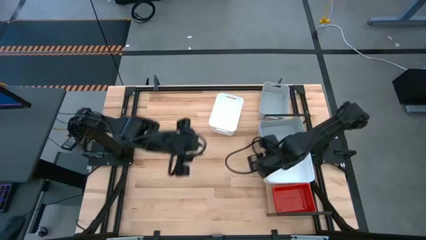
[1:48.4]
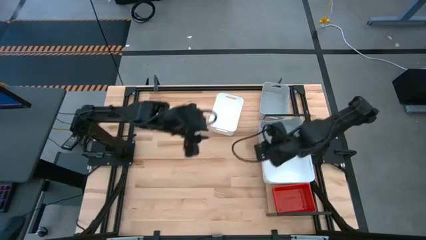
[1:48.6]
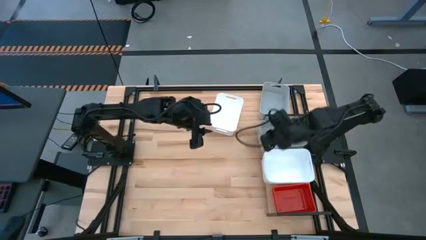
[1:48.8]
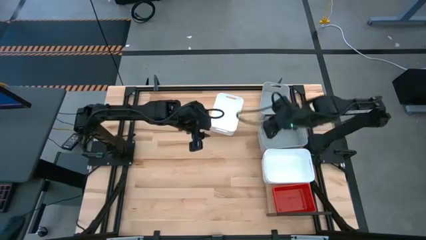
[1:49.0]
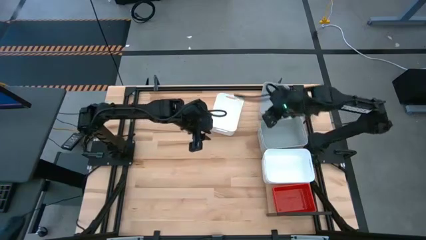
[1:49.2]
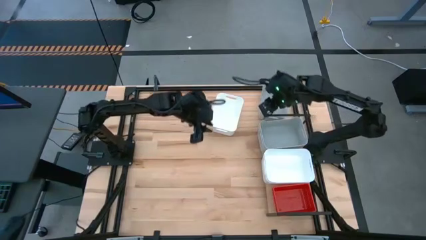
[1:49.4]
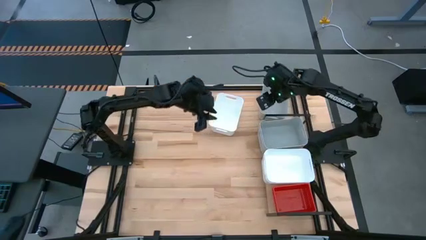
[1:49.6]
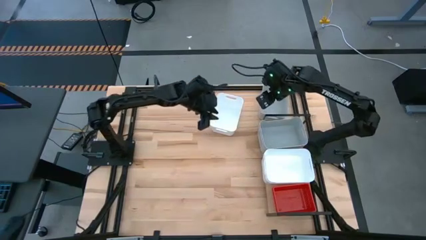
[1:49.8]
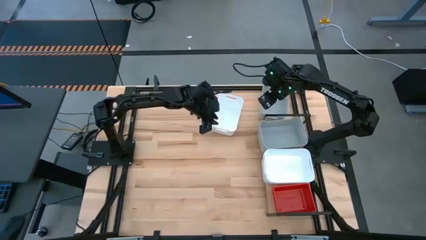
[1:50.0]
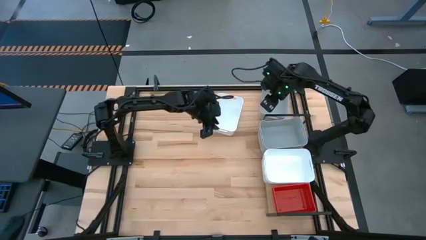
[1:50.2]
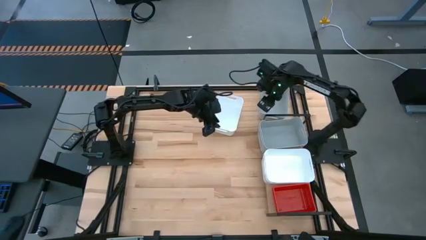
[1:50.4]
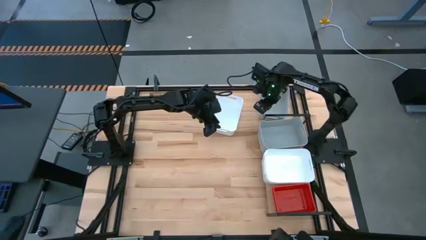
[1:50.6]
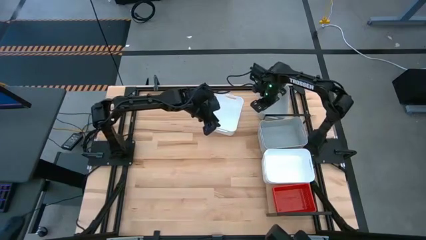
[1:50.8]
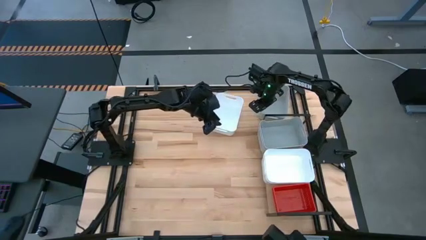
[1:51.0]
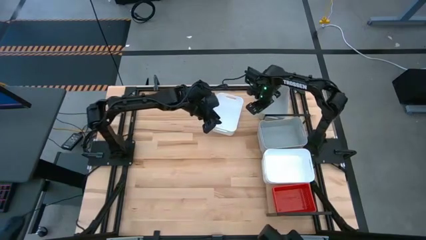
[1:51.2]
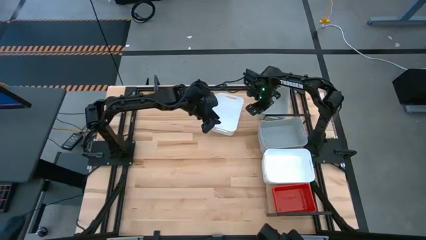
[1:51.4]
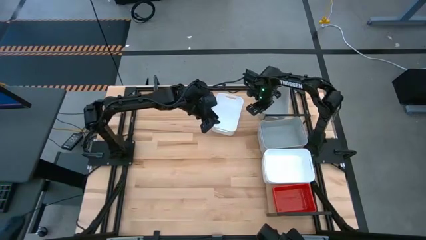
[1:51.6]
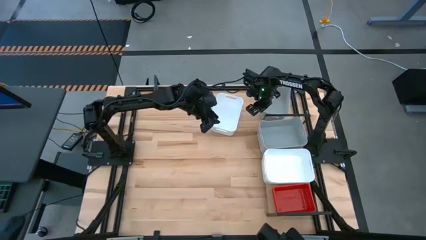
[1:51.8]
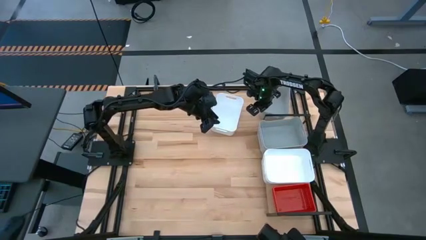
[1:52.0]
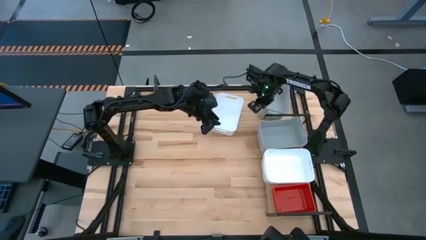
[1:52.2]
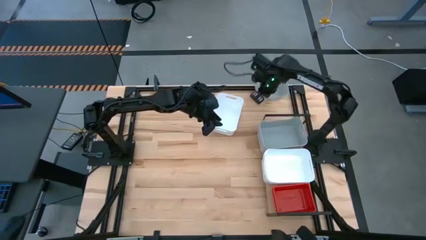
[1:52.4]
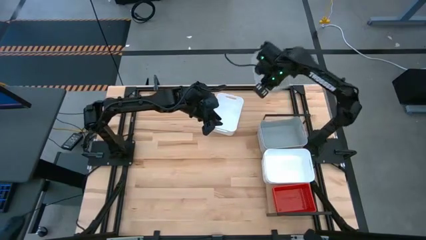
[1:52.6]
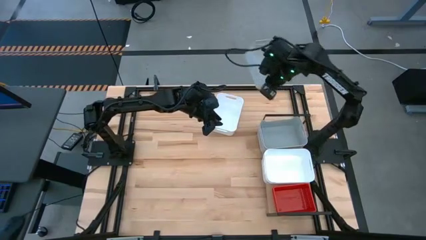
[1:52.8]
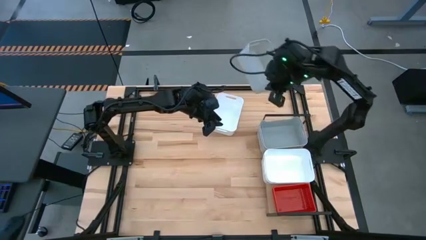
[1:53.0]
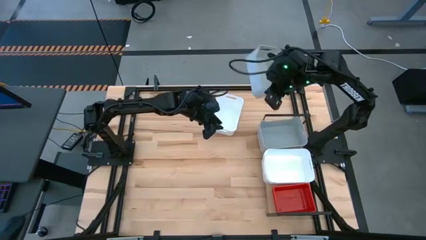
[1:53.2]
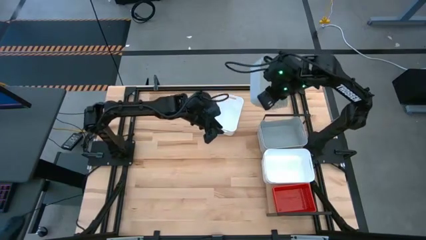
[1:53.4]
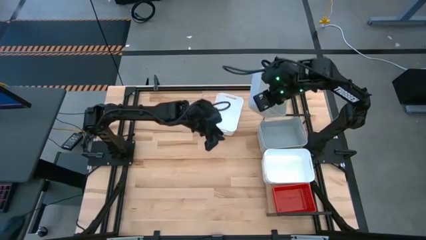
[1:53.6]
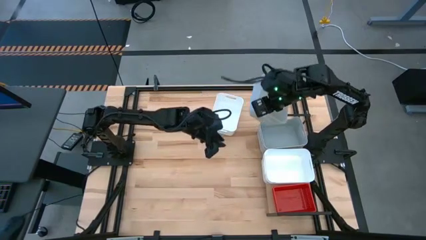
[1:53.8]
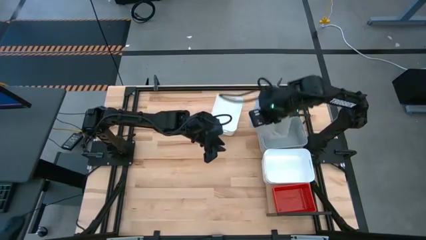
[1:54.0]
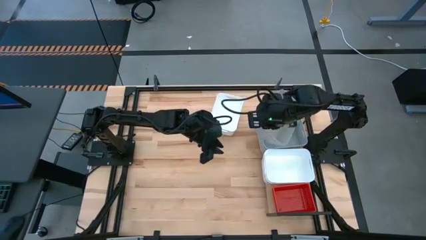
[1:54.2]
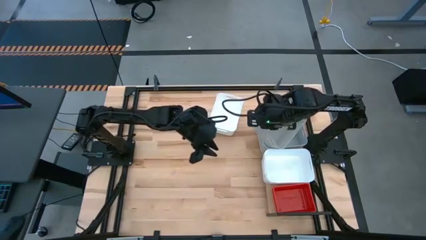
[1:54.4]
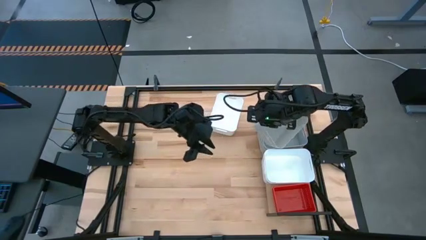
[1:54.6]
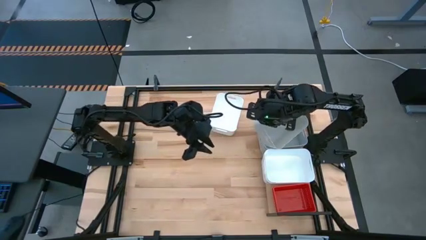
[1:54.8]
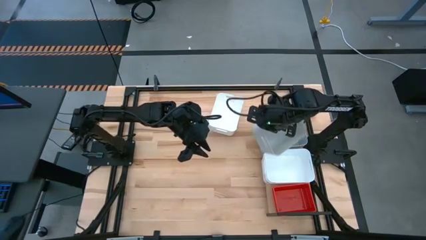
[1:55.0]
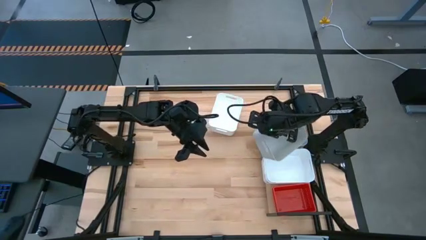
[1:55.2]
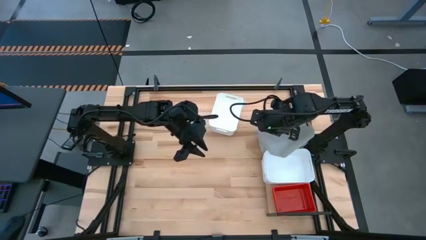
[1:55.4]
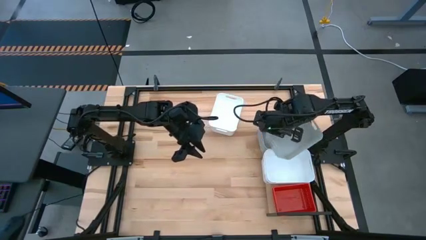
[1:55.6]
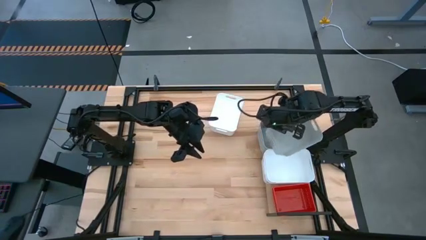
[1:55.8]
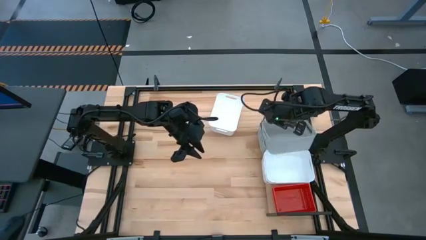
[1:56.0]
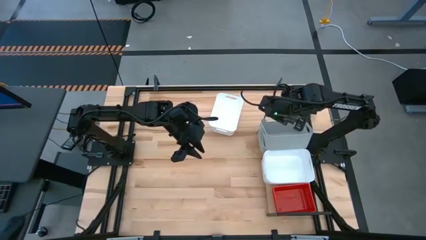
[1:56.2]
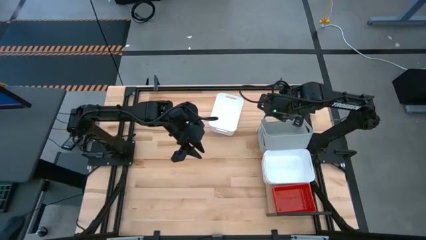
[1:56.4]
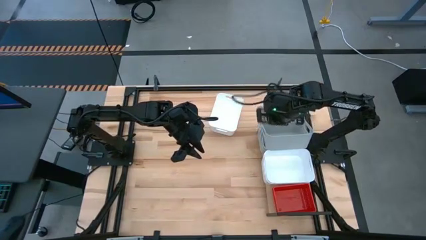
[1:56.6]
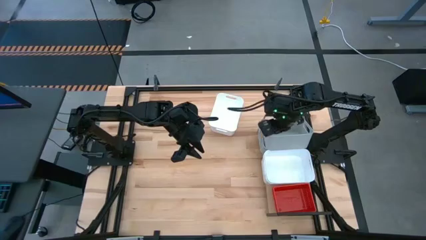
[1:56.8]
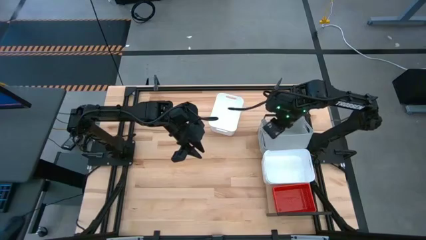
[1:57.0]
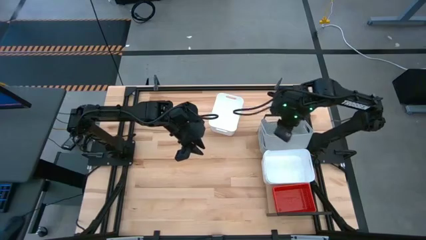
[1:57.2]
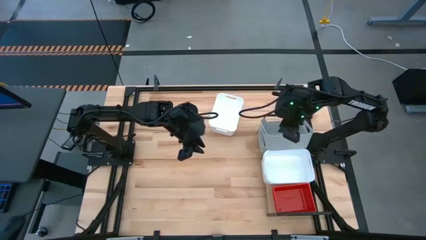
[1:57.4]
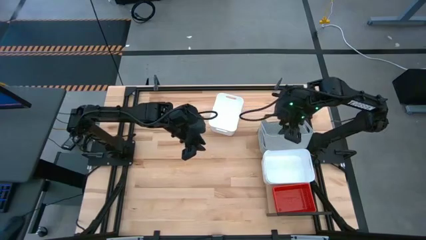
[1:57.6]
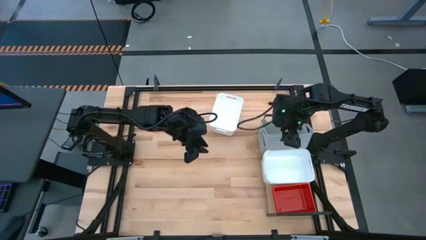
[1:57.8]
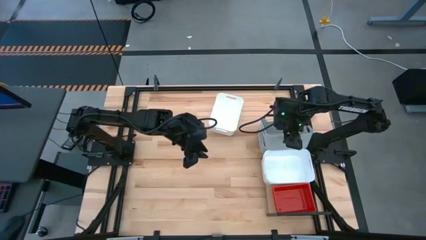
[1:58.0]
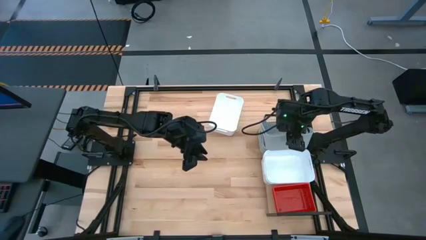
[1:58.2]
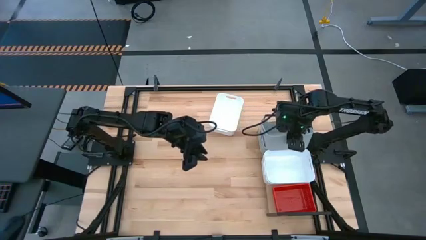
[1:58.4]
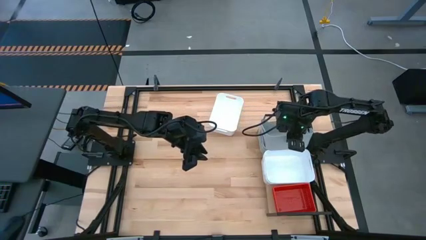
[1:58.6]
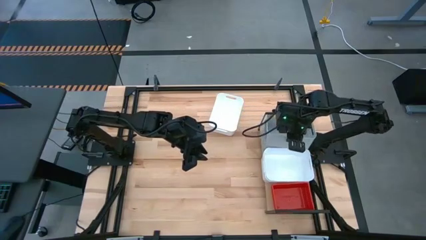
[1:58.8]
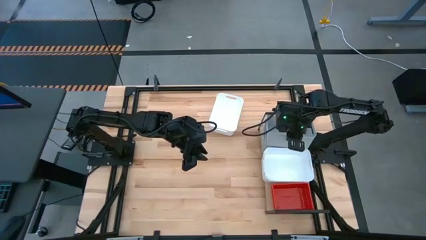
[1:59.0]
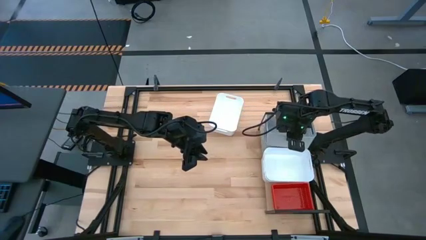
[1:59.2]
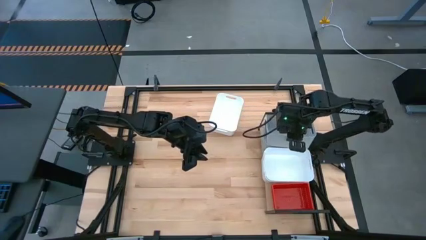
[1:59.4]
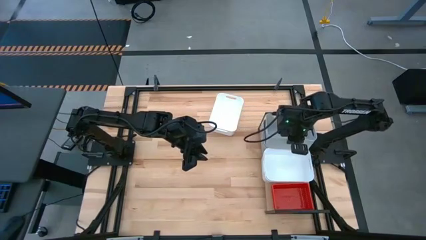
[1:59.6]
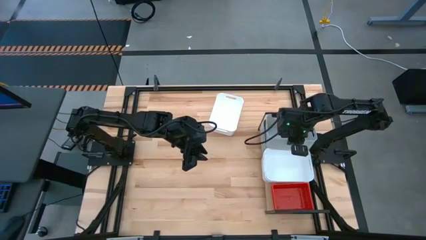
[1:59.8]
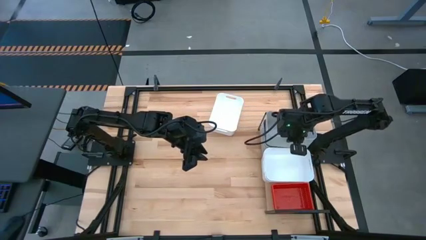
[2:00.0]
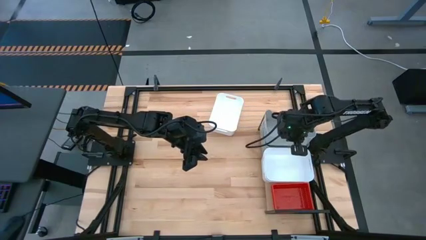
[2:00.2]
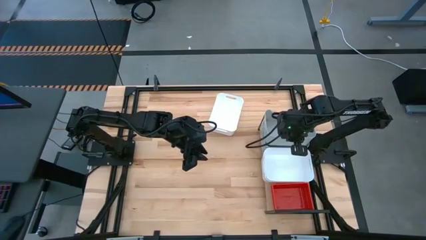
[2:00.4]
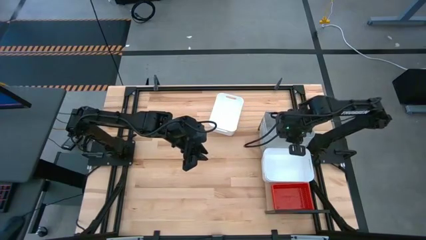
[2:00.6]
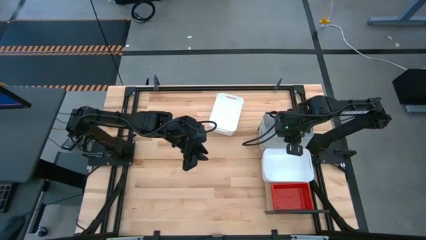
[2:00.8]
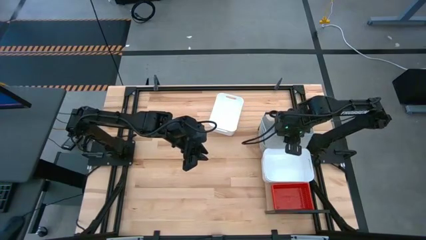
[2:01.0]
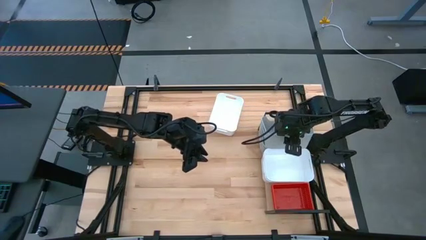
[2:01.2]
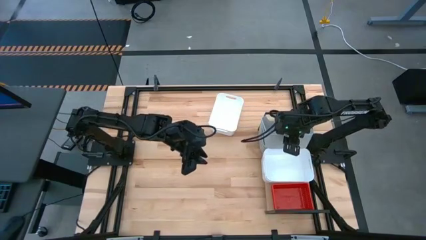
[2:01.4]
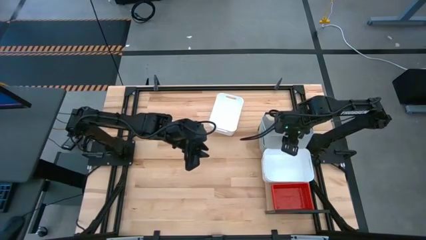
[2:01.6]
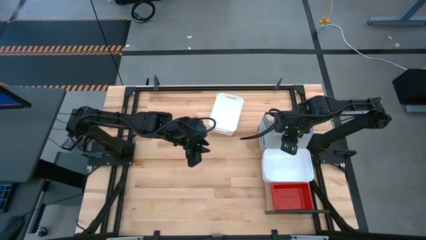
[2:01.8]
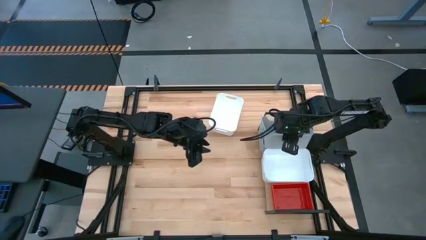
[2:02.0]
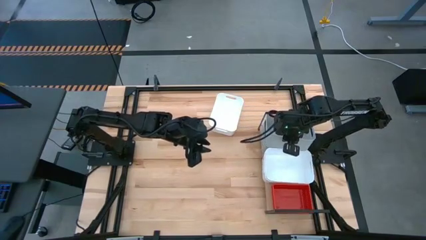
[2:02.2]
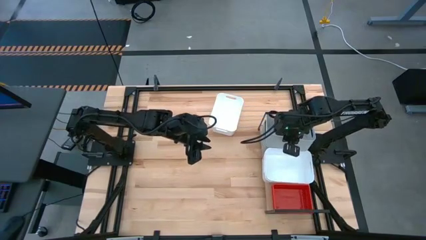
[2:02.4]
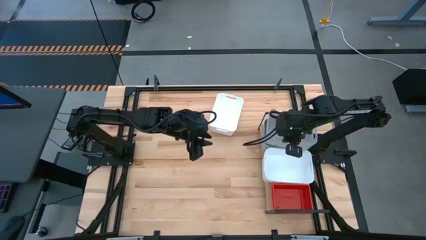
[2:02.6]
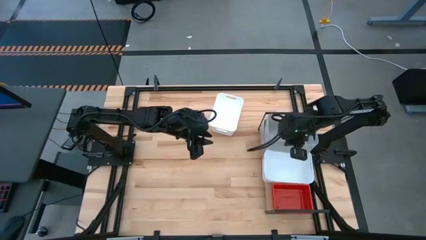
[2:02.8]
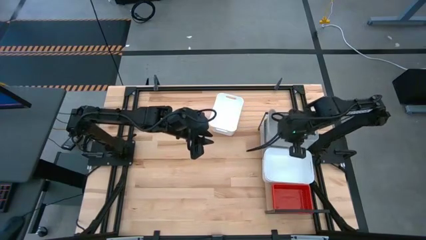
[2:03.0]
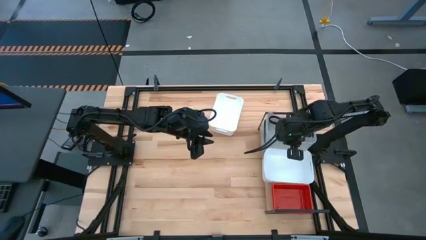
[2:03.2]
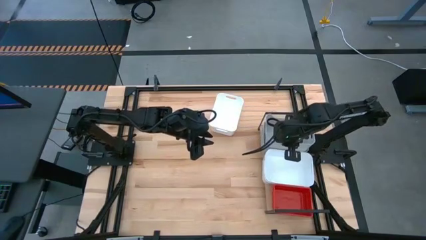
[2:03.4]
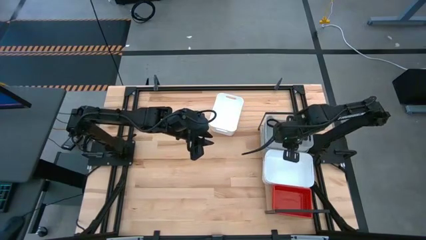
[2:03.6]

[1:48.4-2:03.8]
Task: Stack baskets on shelf by color
Stack the gray bin on top of the gray bin on the shelf
